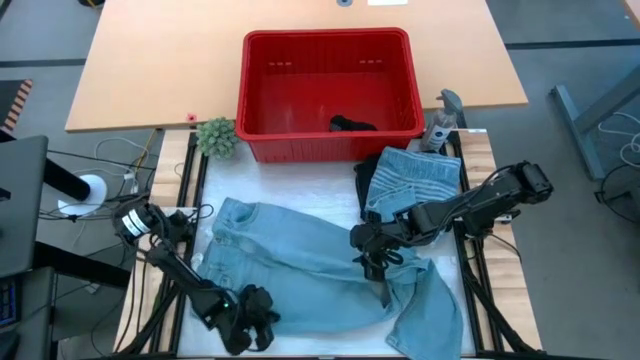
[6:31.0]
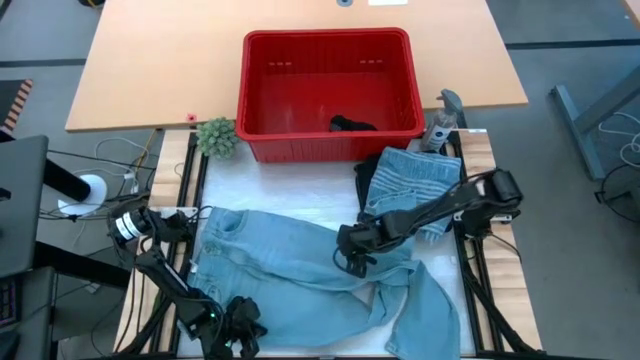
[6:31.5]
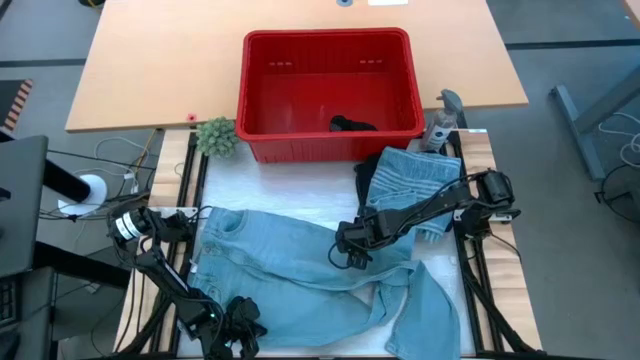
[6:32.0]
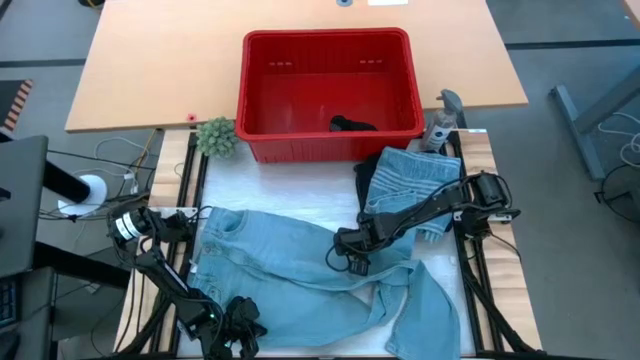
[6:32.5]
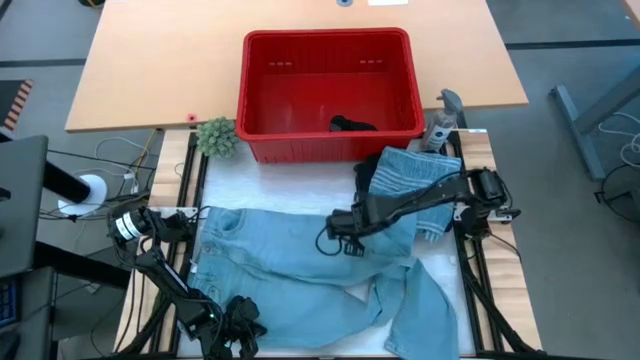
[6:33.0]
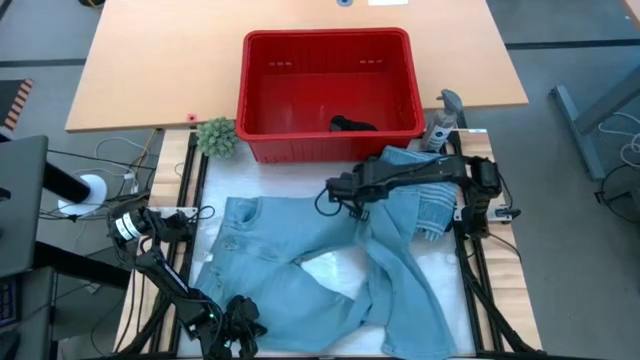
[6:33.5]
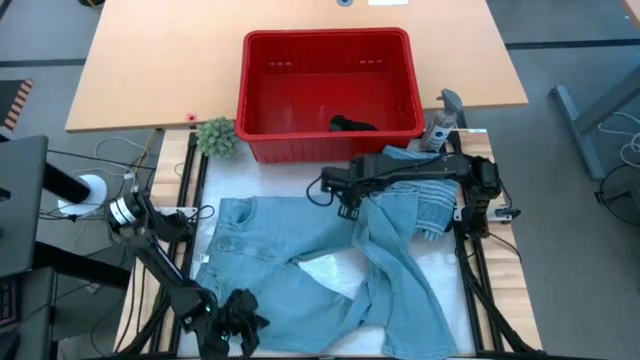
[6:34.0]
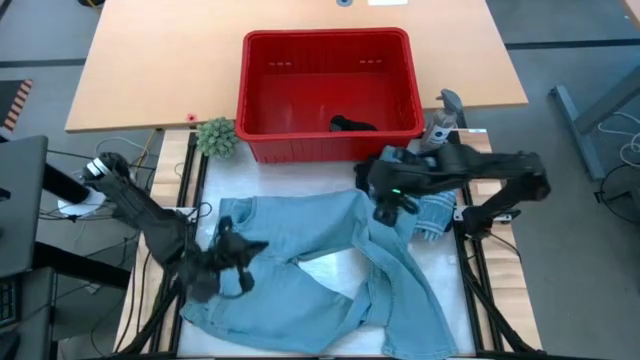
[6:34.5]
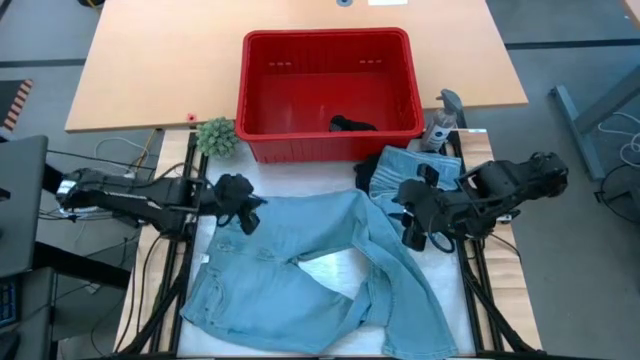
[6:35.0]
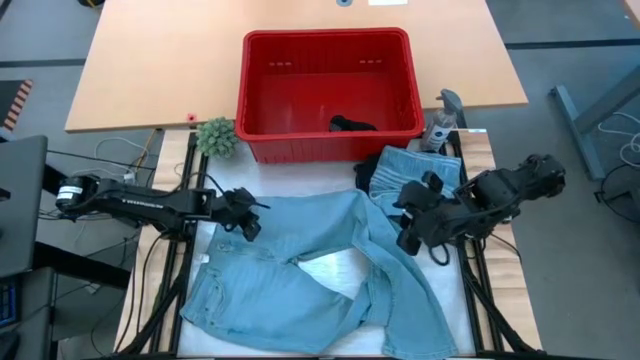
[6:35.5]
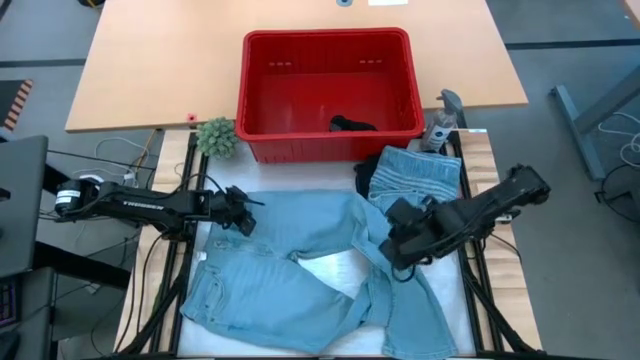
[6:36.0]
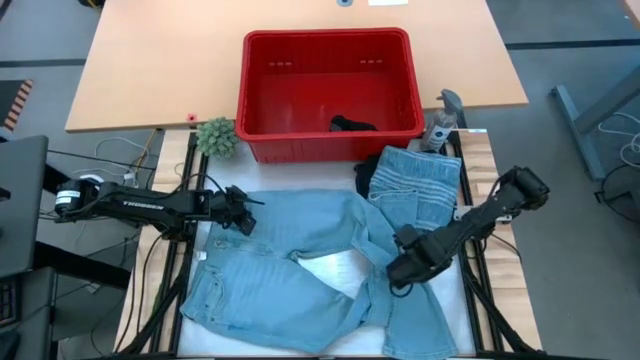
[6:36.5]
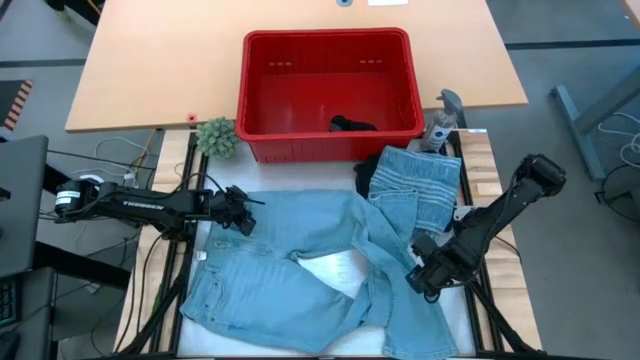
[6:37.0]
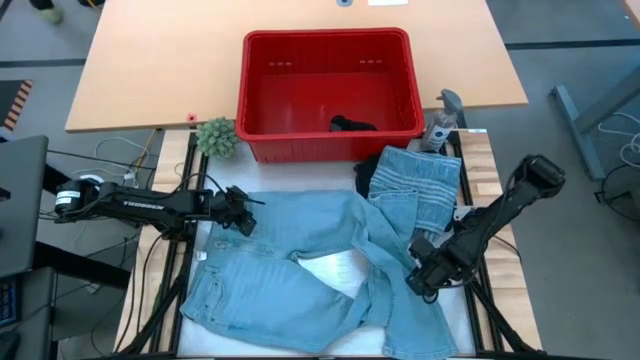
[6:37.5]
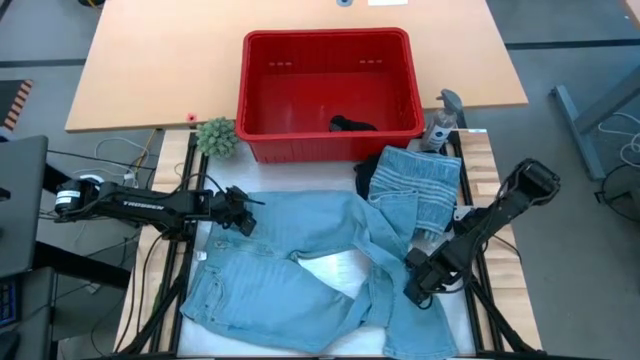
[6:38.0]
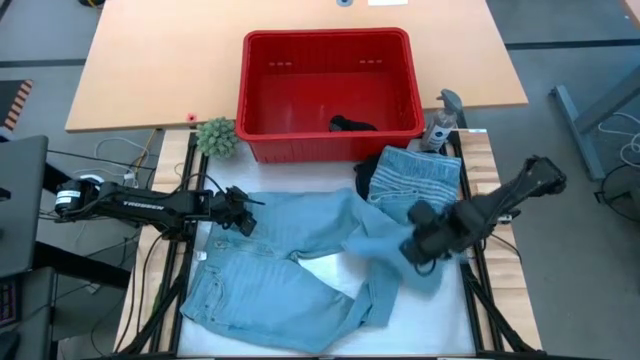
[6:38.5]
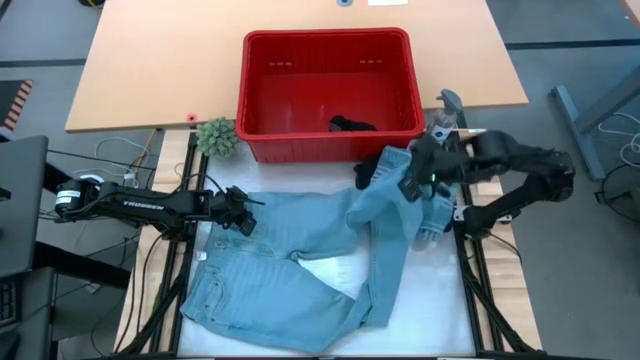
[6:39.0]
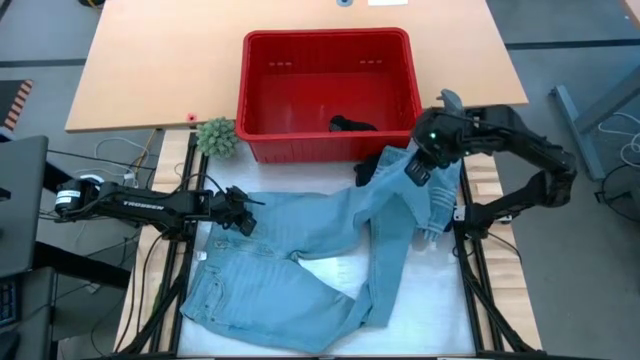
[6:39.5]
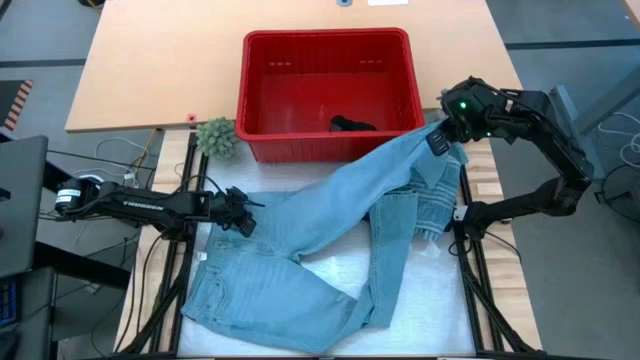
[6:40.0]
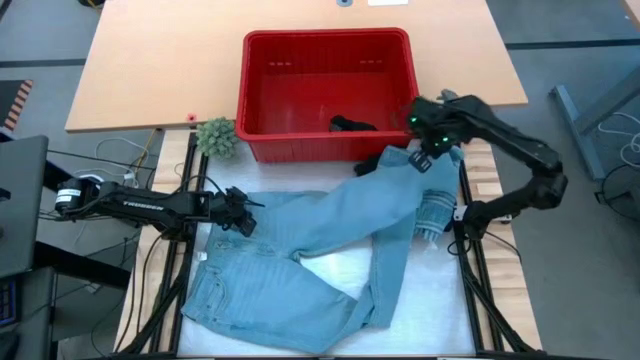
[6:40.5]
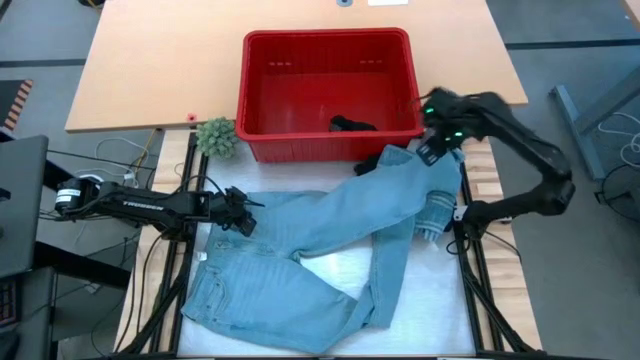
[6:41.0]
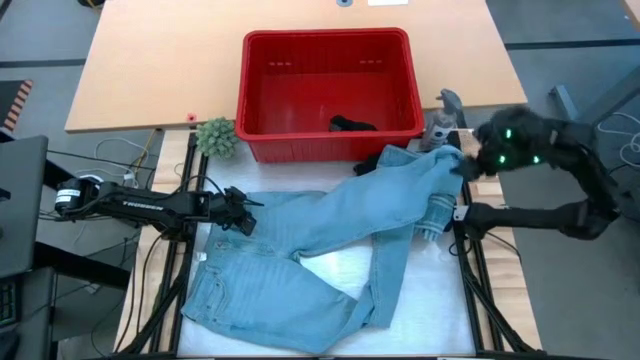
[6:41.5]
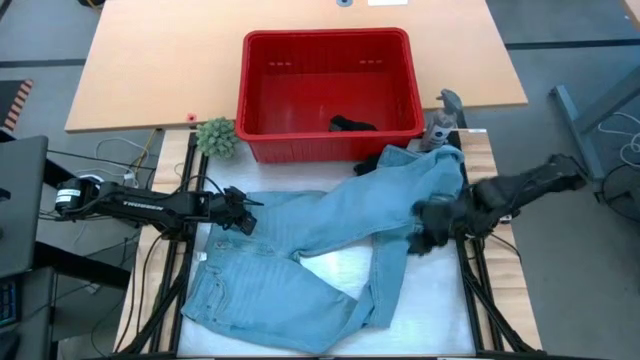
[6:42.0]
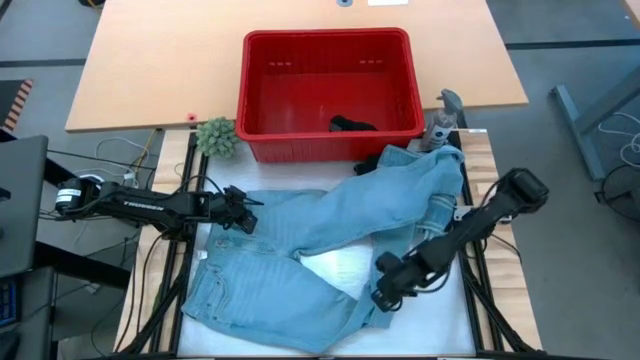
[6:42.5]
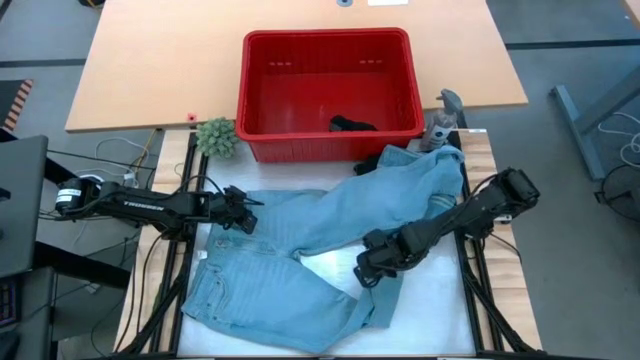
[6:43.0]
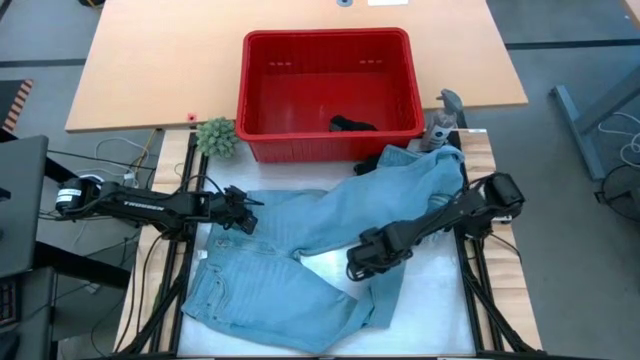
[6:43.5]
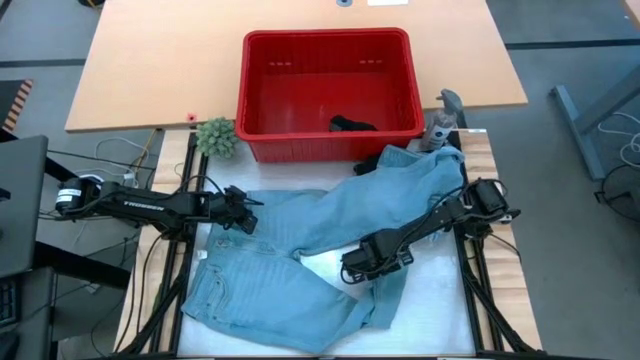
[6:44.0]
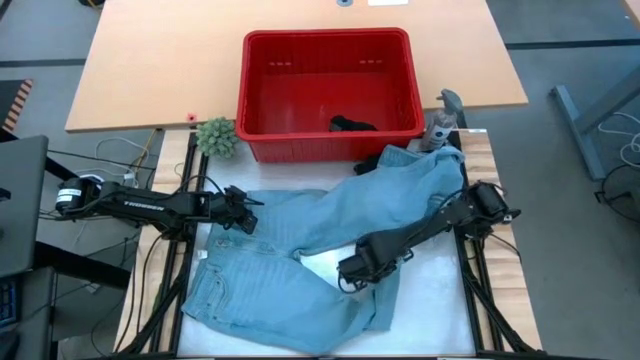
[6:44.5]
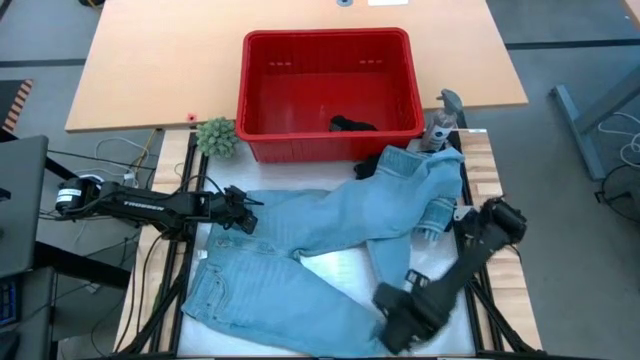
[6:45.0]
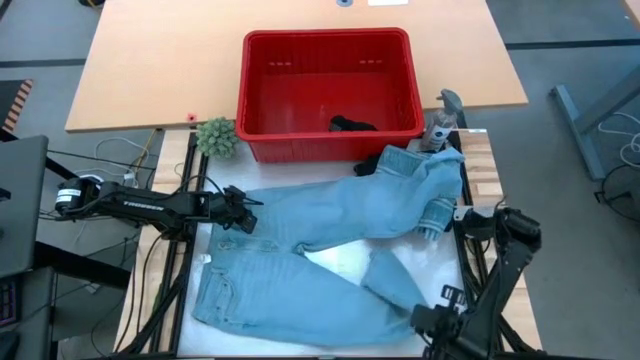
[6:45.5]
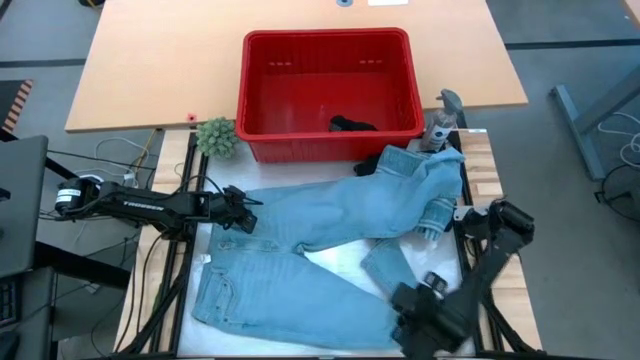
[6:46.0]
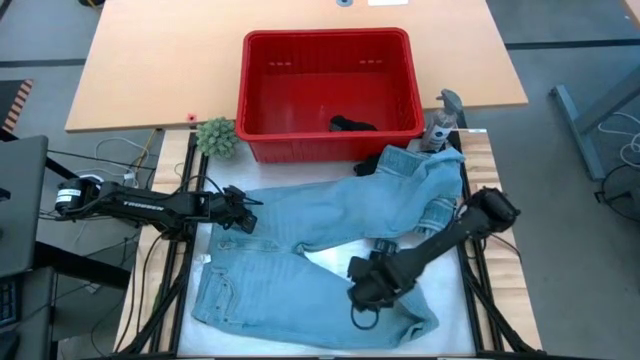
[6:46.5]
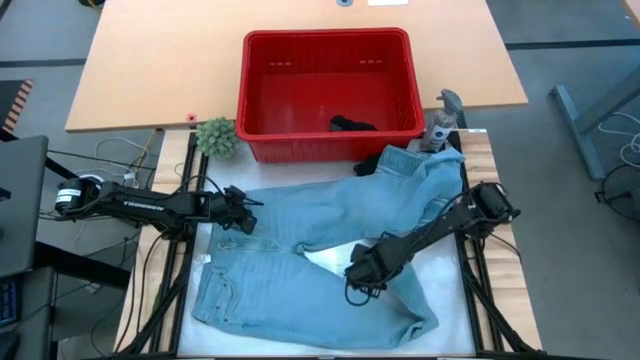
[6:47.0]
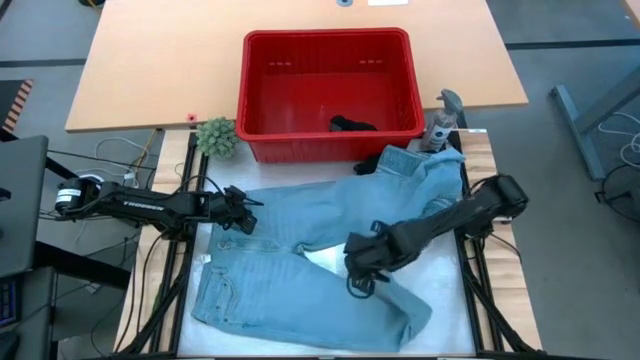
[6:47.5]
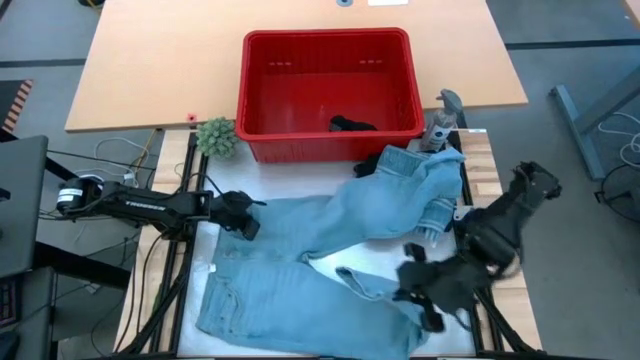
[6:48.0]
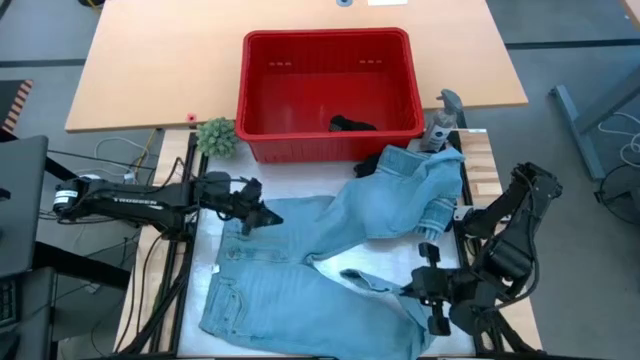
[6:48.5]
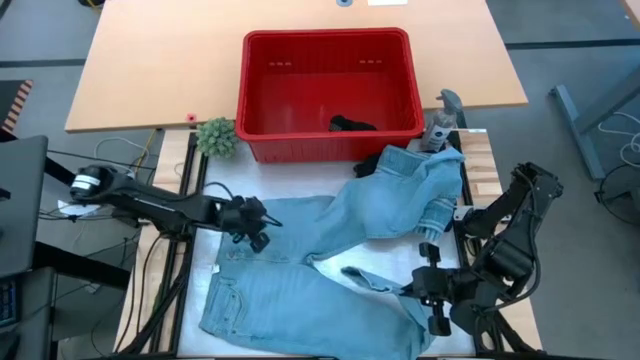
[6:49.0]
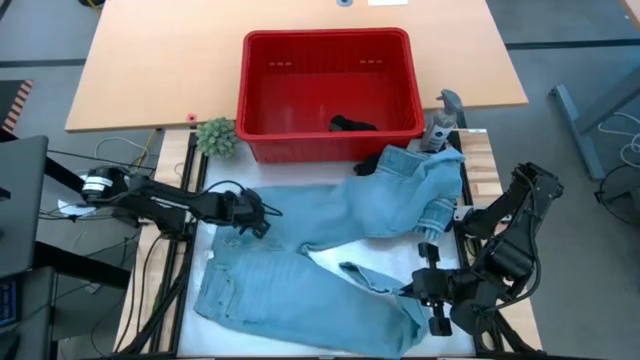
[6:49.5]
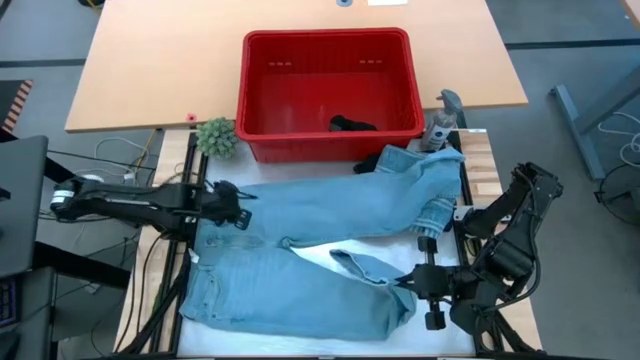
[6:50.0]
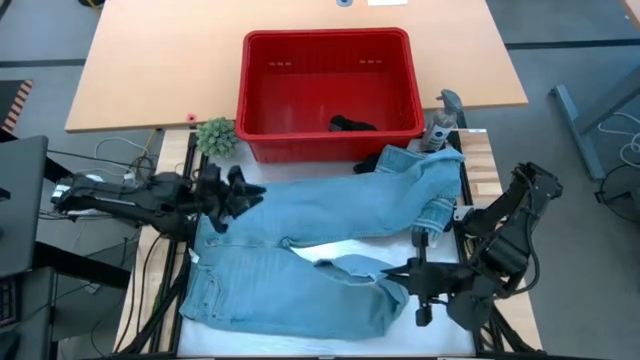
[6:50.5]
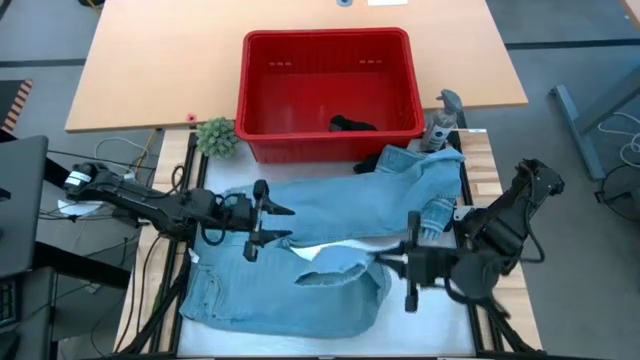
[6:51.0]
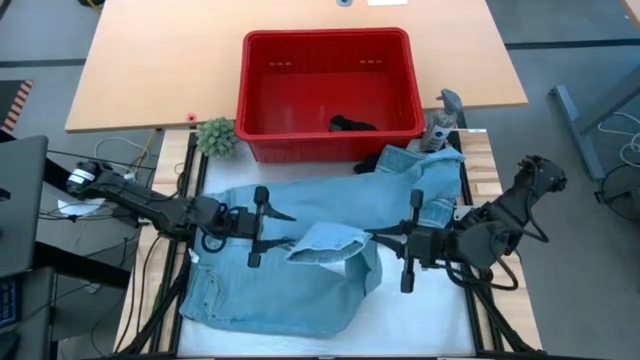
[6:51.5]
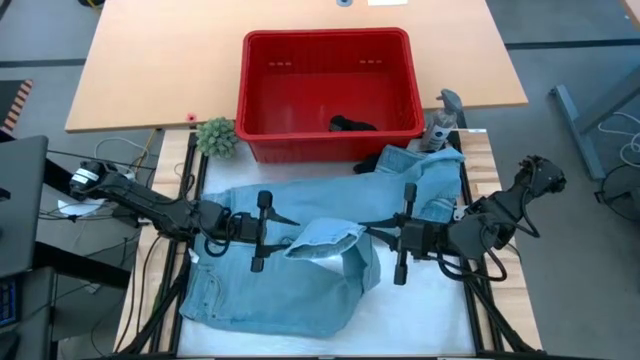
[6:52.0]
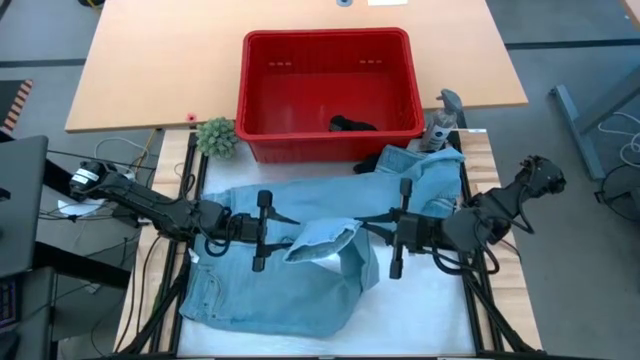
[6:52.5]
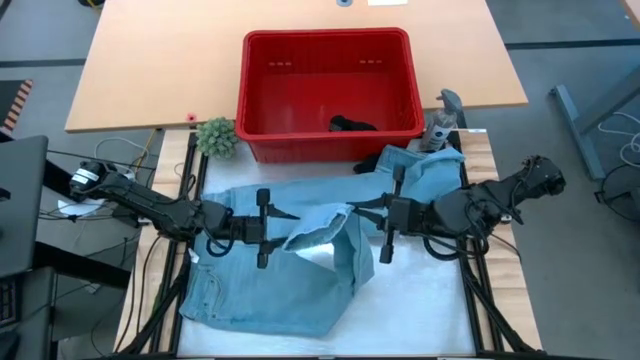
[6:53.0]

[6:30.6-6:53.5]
Task: Fold Laundry from Bin
Fold the blue pants
